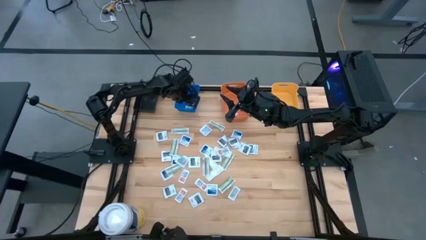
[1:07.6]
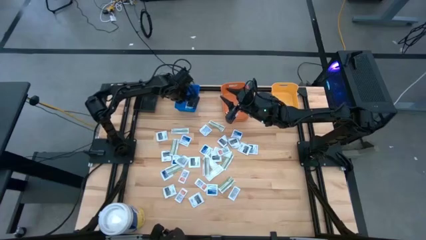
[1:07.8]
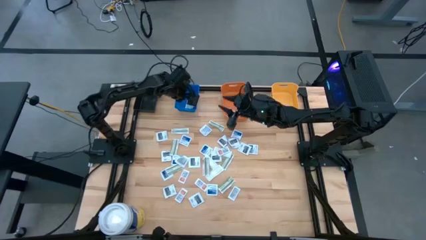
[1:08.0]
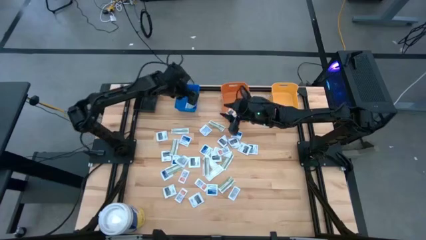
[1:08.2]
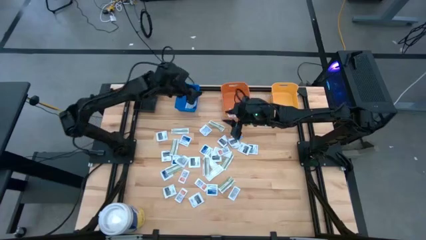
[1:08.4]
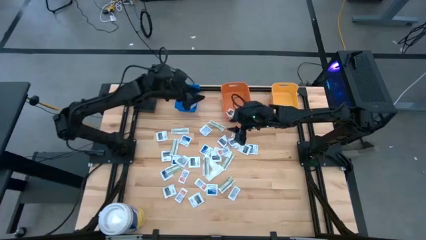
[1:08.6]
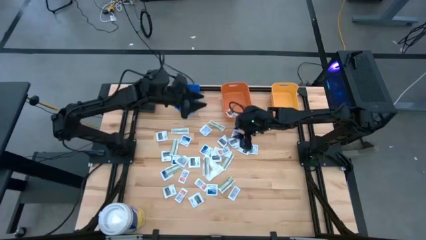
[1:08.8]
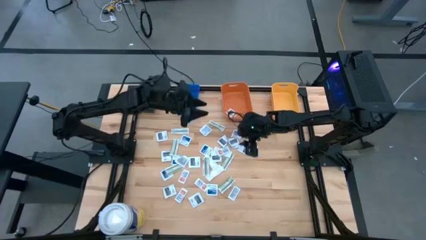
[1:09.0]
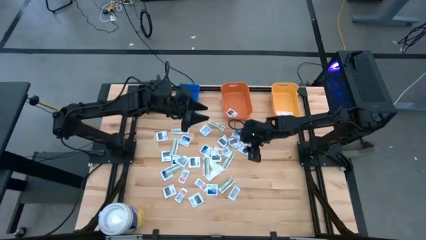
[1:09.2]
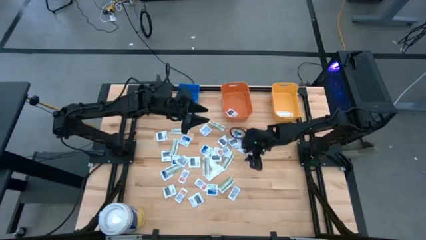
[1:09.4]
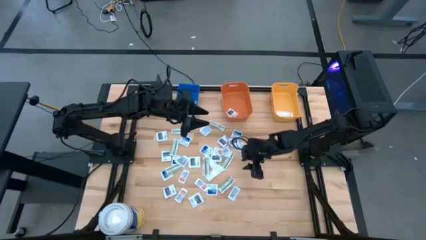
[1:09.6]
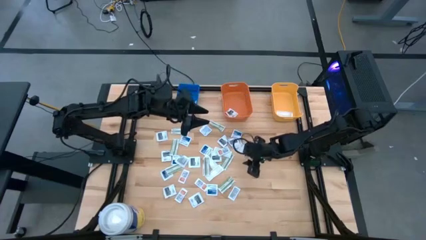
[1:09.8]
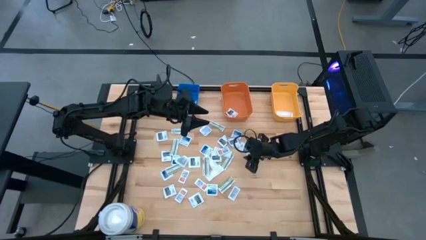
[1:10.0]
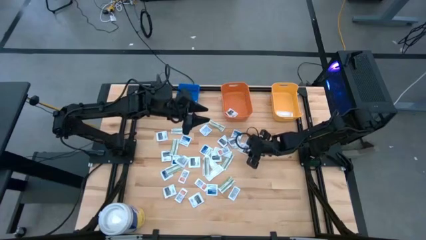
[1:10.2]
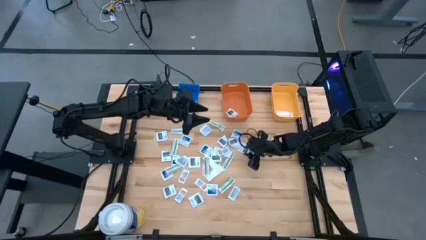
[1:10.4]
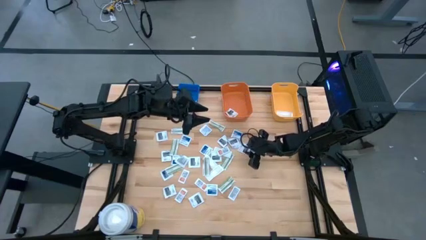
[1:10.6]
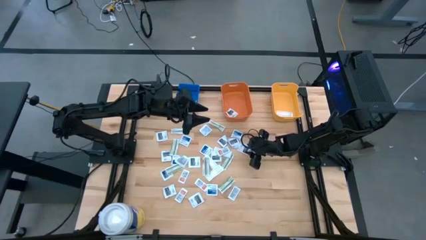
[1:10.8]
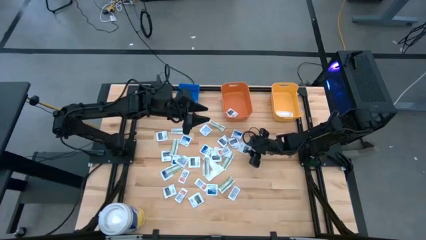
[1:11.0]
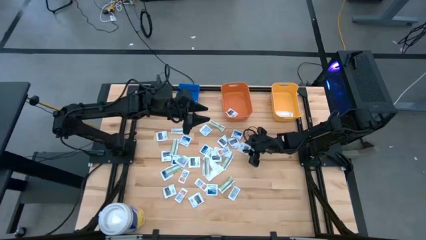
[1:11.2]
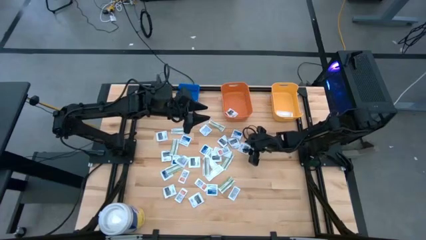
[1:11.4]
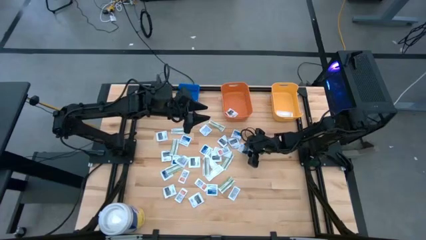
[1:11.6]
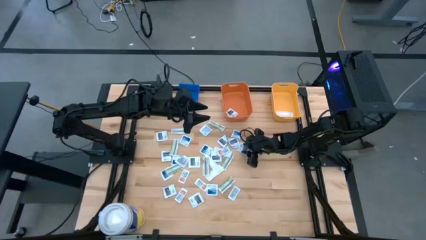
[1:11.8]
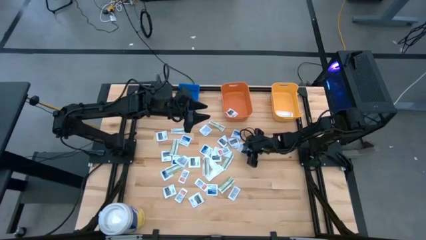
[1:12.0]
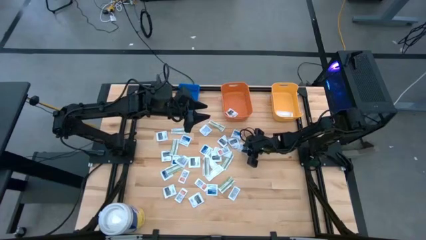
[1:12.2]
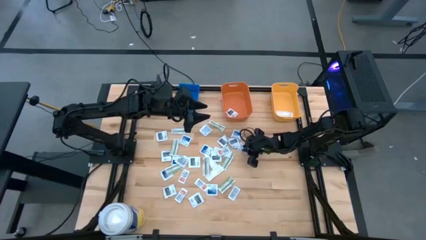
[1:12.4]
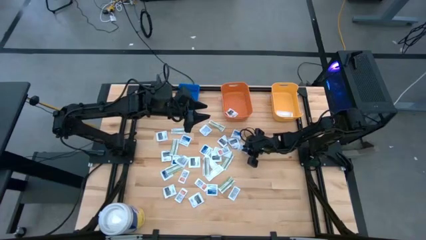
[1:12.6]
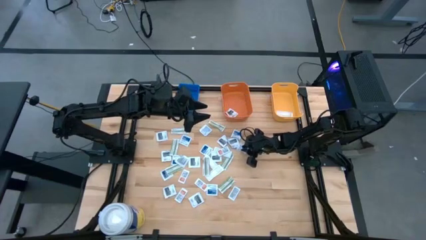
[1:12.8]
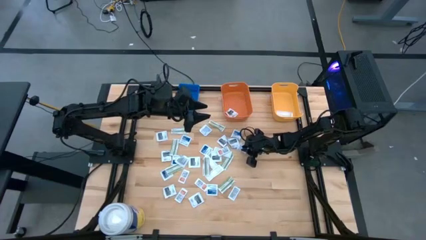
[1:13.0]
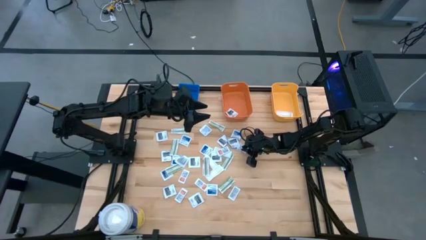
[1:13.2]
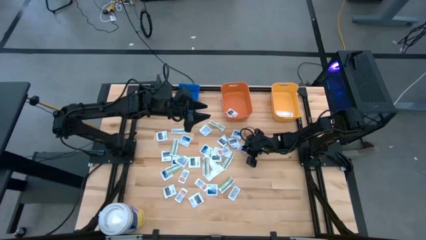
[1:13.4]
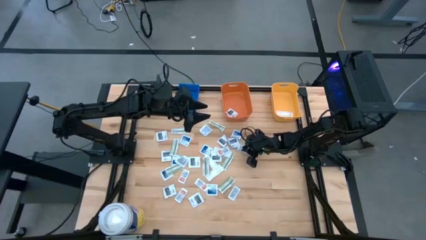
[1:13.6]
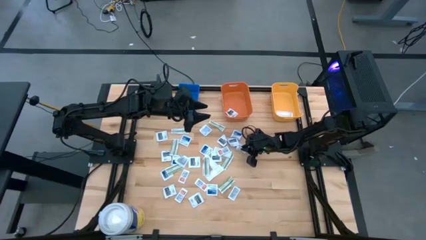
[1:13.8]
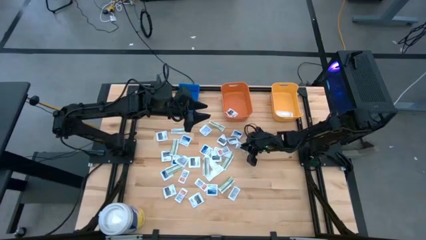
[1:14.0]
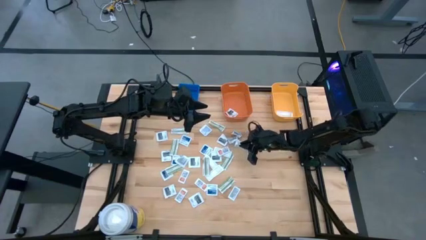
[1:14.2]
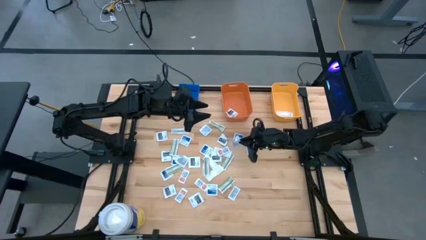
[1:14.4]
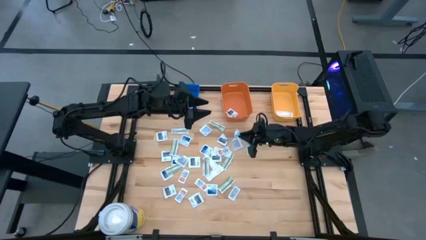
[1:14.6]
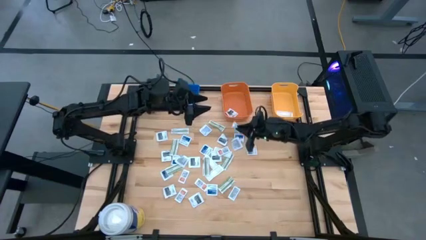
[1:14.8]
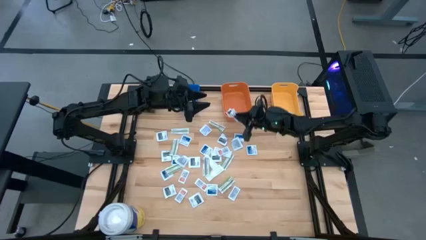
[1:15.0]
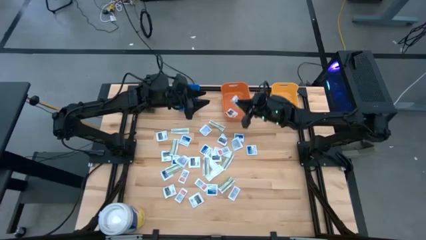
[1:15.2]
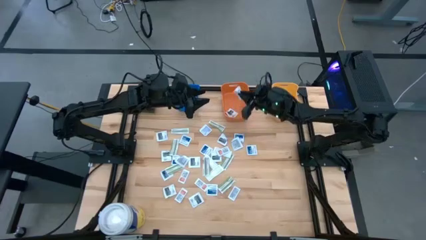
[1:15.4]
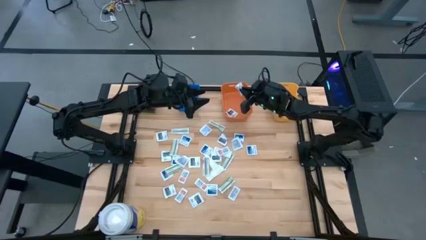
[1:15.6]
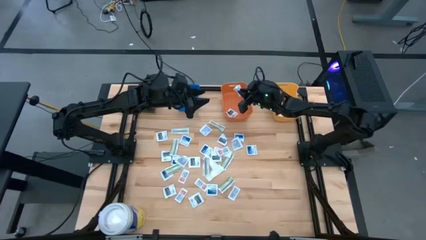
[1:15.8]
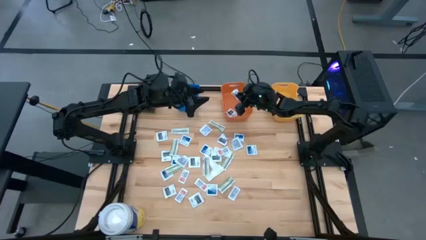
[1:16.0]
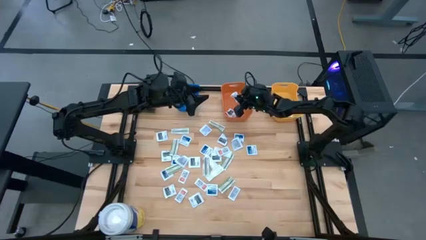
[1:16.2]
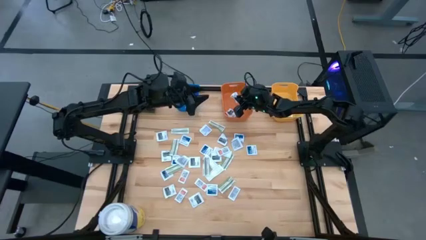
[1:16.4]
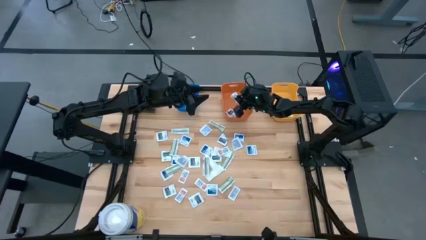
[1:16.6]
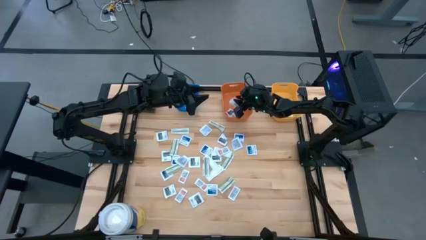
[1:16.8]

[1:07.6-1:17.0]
Task: Pick & Place First Aid Supplies
Put the towelette pack into the orange bin

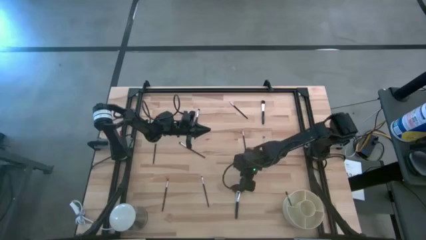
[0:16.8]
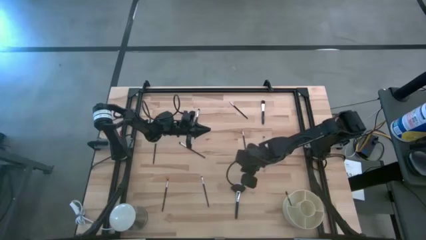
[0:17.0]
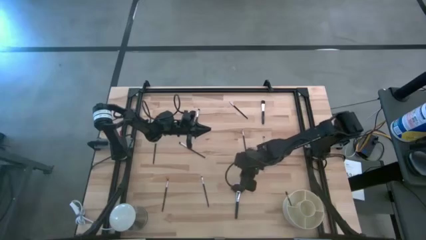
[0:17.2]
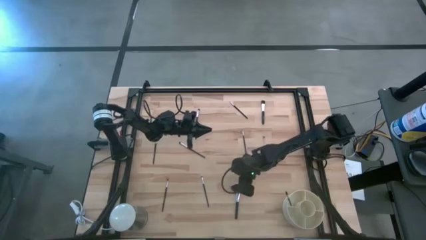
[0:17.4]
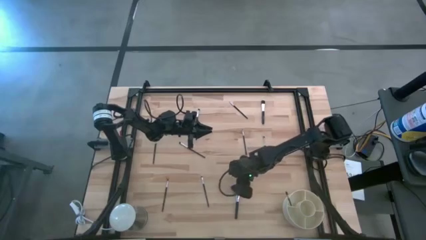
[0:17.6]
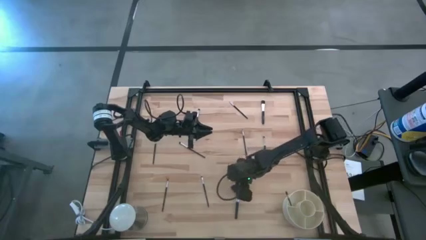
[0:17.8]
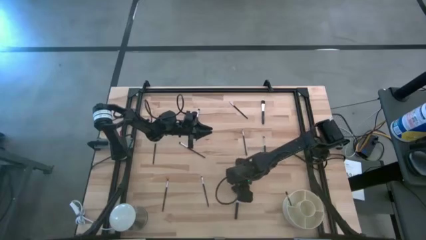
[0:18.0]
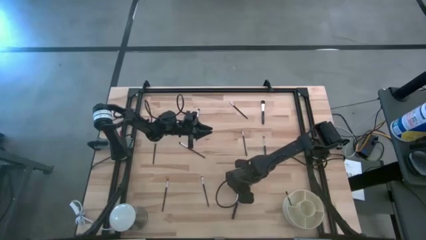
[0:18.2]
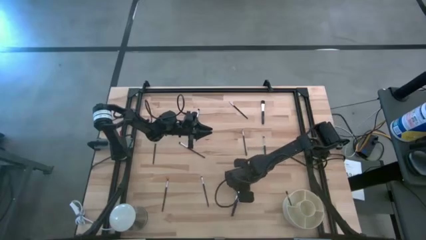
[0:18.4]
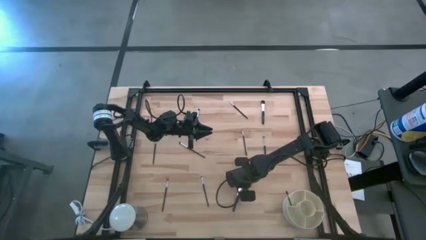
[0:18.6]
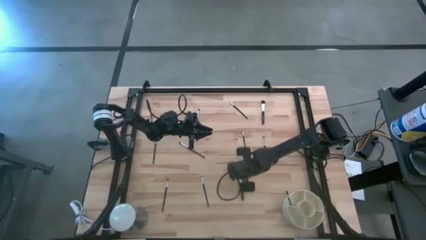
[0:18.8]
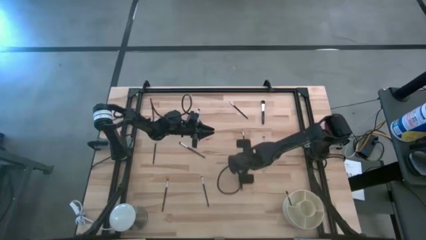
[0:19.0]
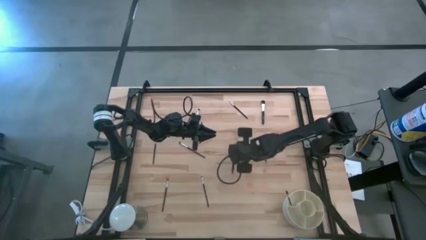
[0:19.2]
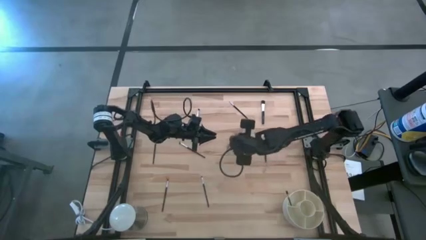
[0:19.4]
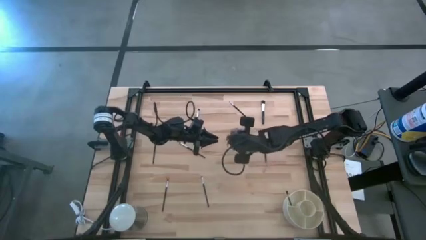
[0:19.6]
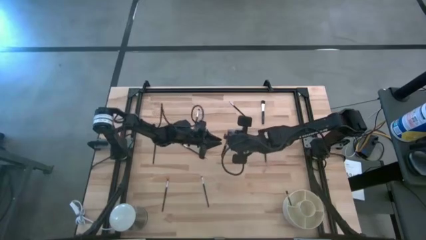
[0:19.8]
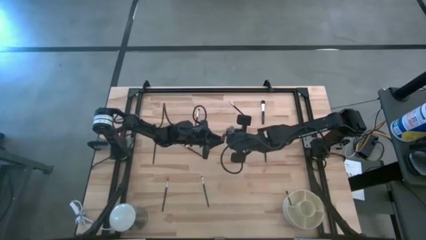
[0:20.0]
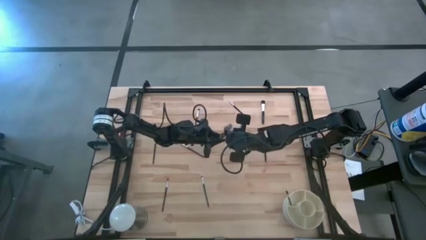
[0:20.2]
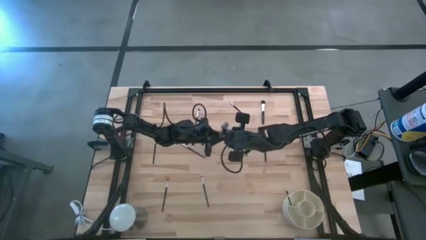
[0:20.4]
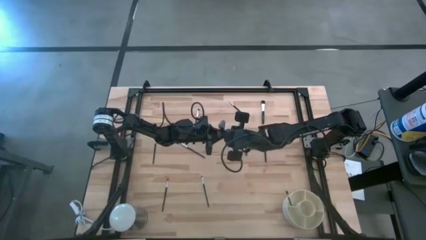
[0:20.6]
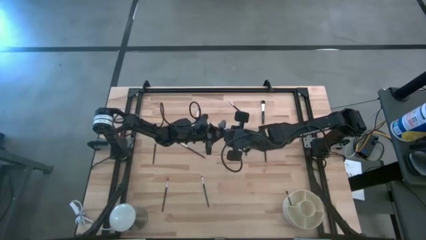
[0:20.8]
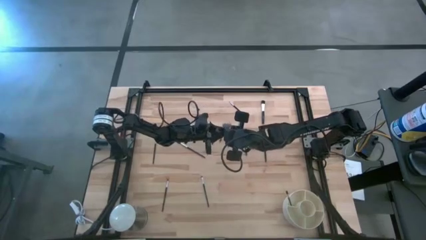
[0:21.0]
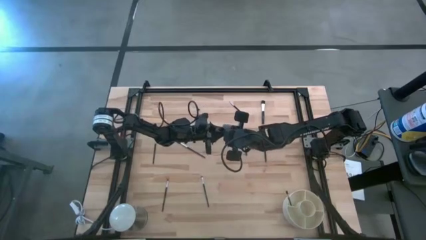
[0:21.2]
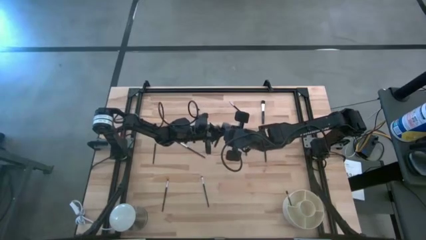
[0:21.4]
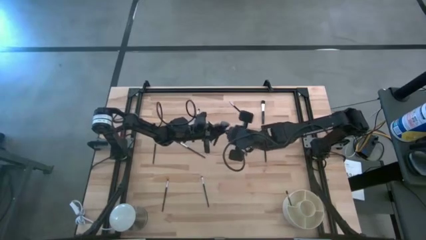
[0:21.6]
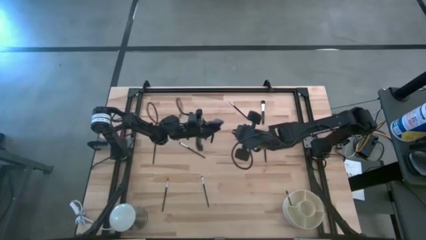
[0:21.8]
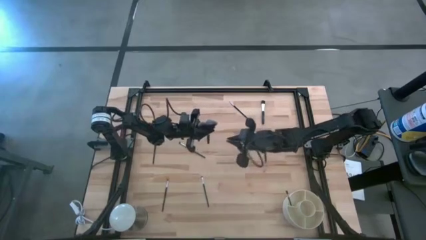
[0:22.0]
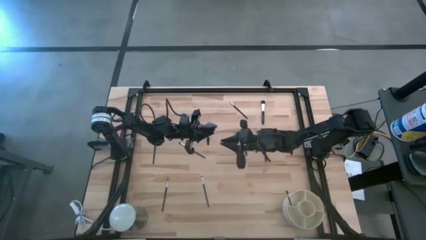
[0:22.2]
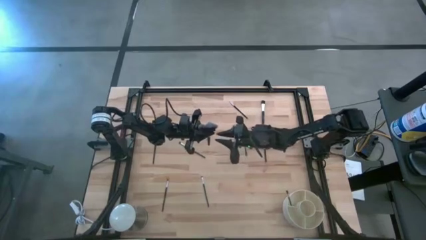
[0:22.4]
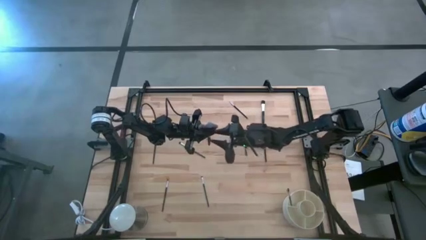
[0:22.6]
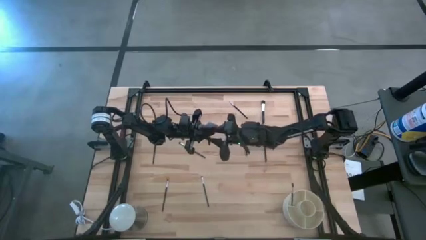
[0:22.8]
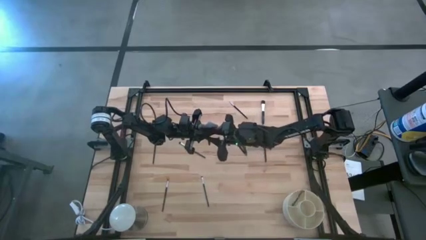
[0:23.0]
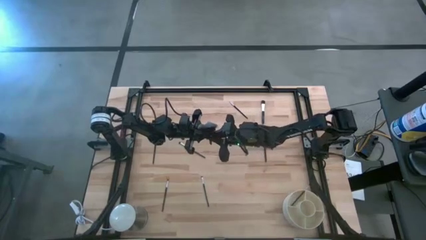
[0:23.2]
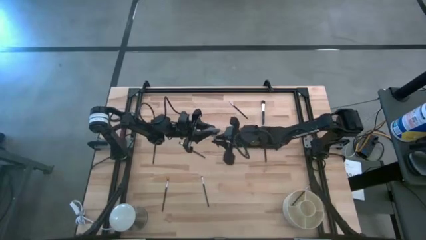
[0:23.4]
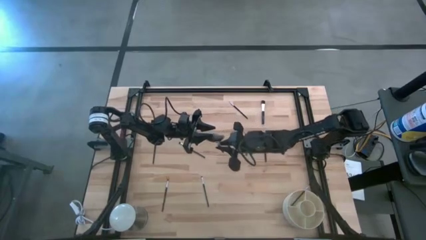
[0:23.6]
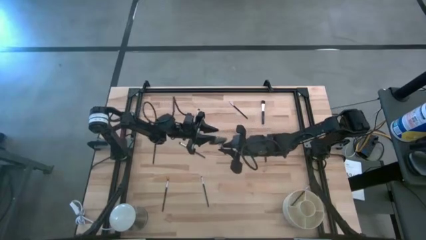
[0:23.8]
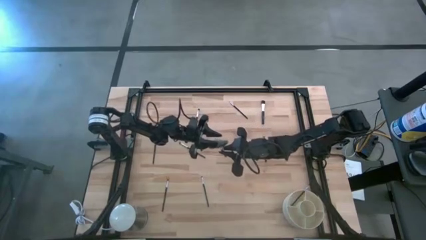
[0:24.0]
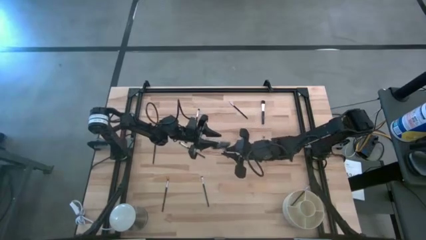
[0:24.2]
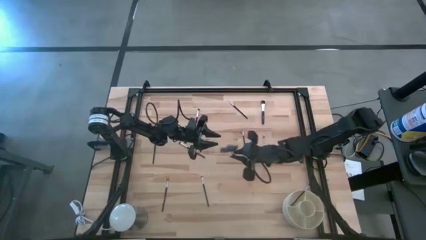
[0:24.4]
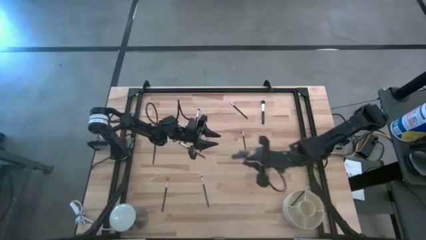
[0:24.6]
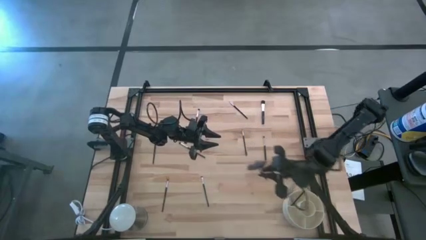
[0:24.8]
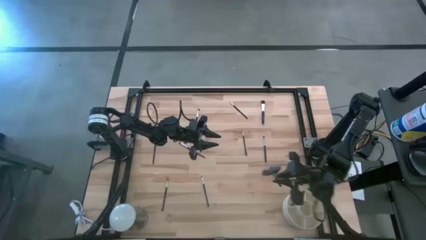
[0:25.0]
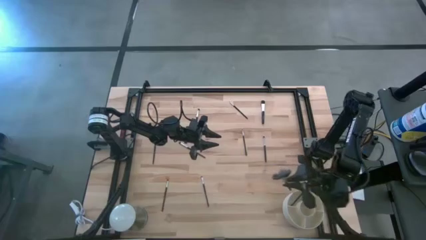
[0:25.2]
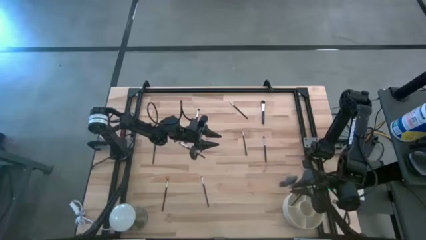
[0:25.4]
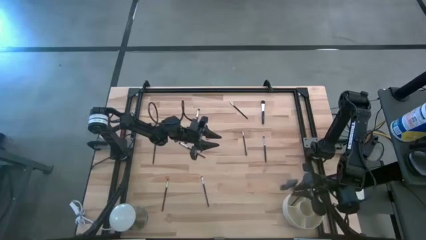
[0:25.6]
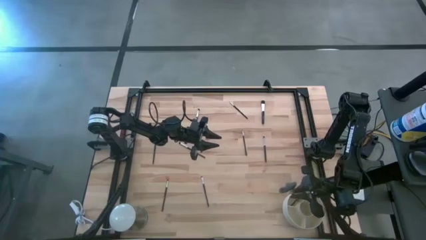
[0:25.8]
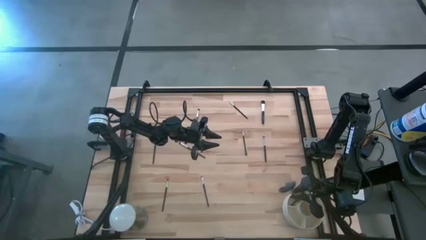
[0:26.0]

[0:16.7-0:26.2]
Task: Put items in baskets/containers
Put the black highlighter brush into the white organizer
